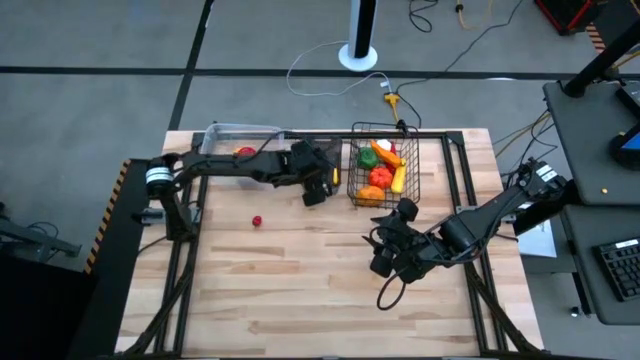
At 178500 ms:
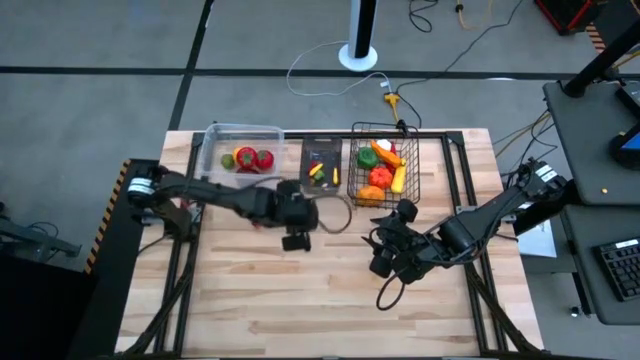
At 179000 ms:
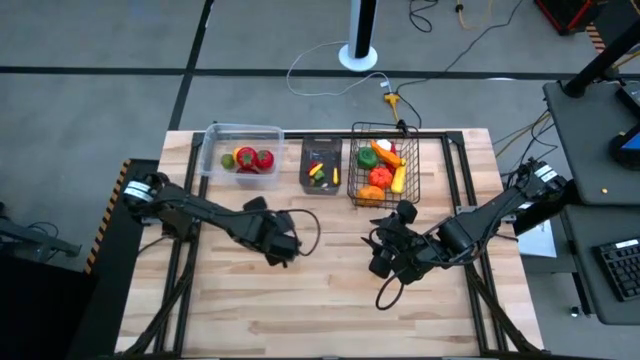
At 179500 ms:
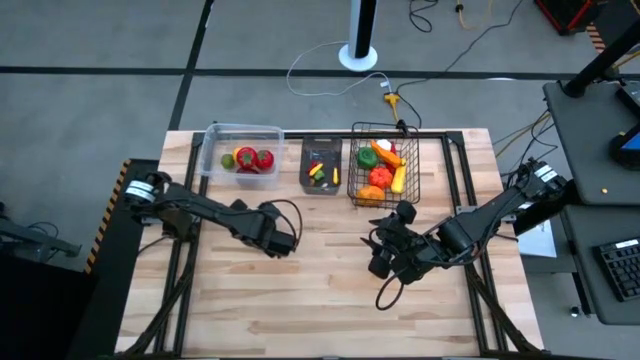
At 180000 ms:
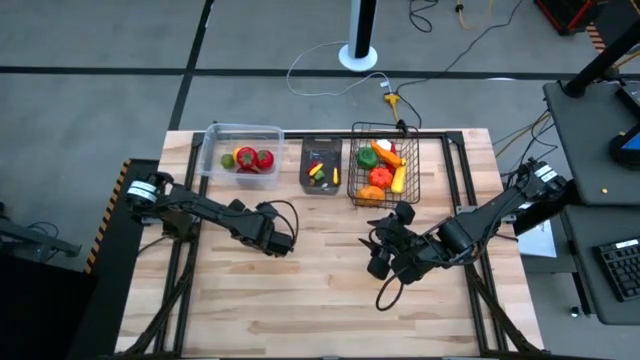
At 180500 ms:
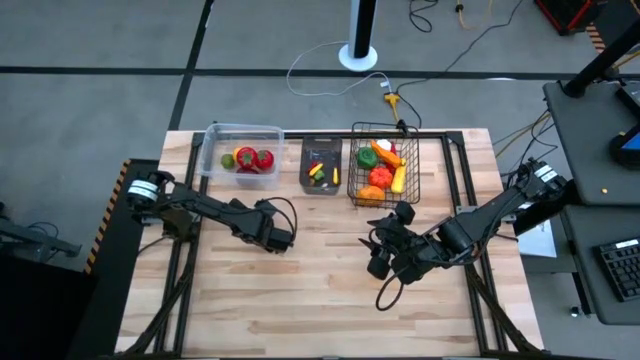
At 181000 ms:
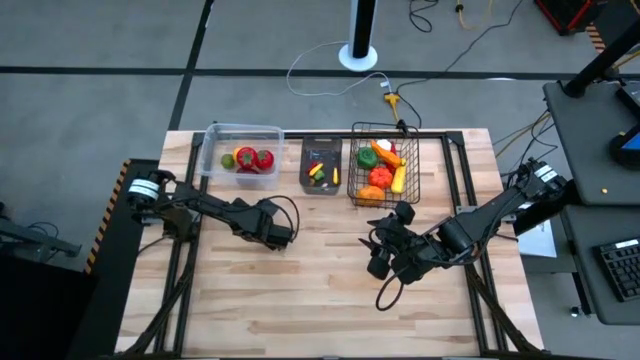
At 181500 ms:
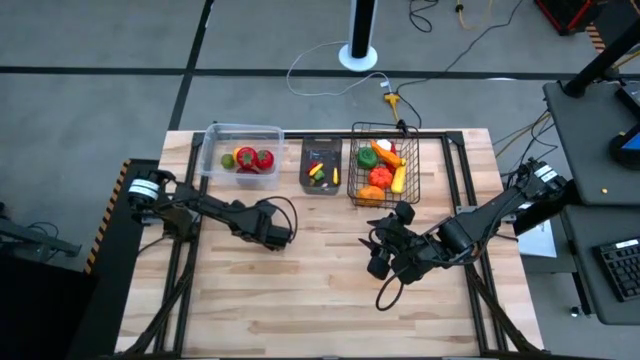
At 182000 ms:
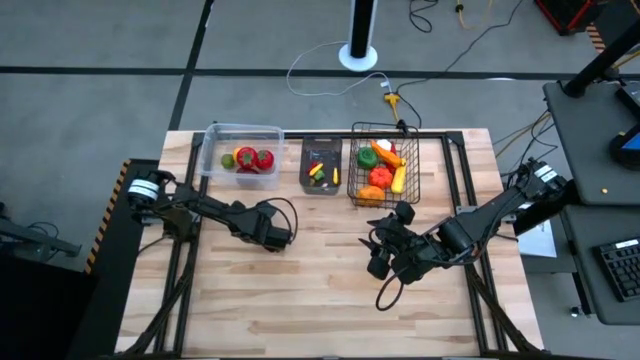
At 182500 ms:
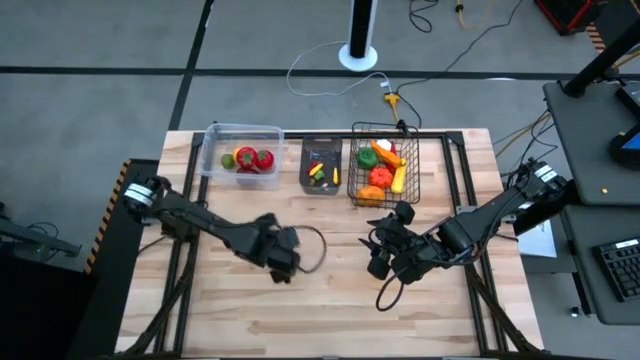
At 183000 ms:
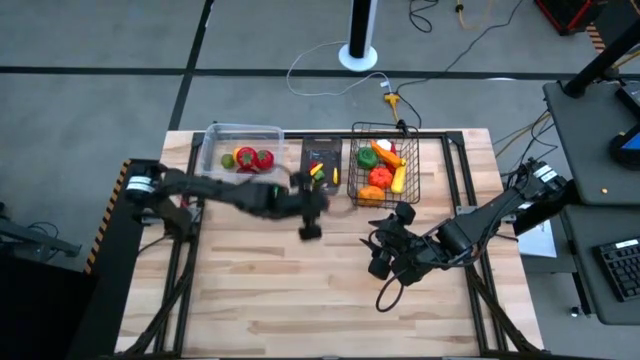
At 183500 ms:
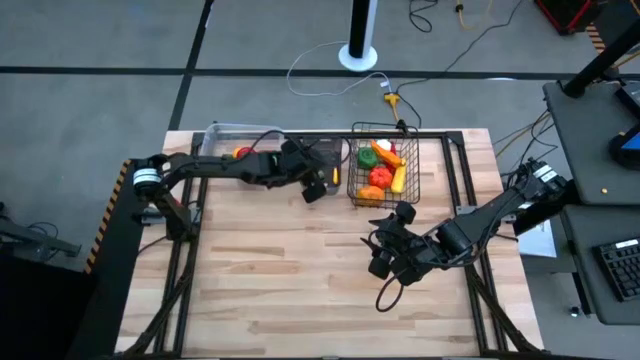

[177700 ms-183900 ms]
Task: Sort produce into baskets
Put the red chili pepper into the black bin

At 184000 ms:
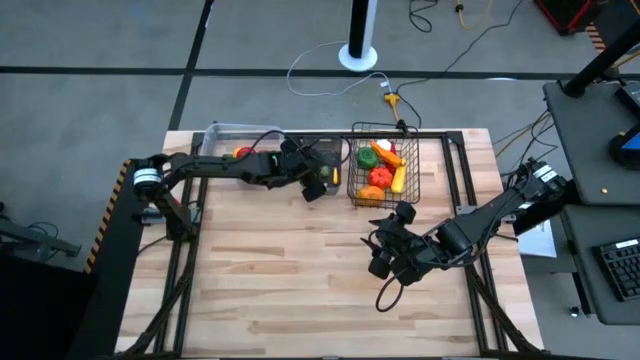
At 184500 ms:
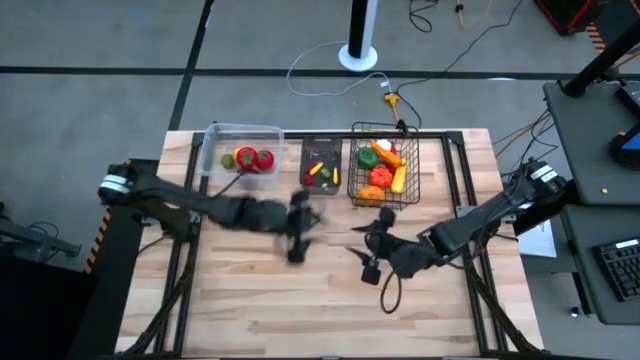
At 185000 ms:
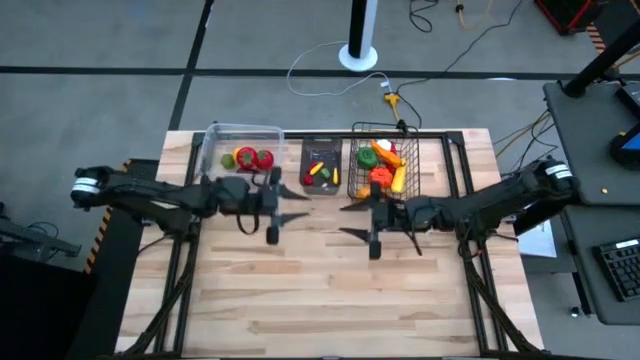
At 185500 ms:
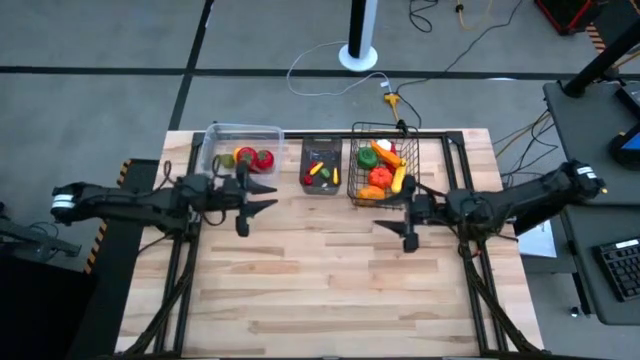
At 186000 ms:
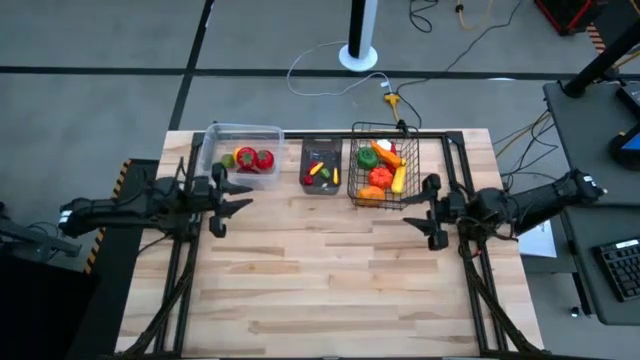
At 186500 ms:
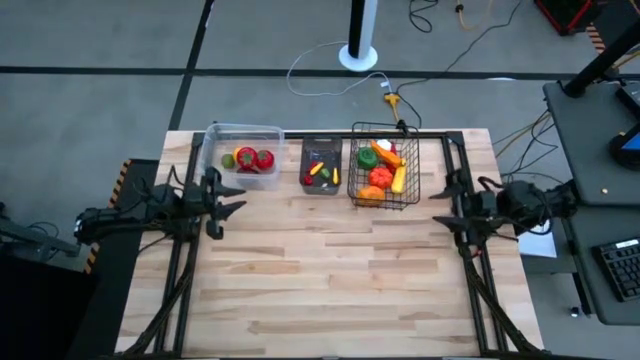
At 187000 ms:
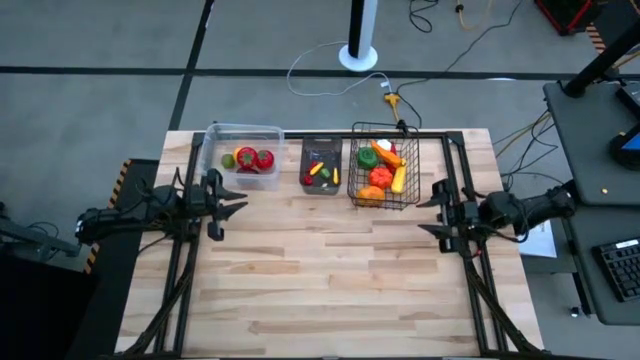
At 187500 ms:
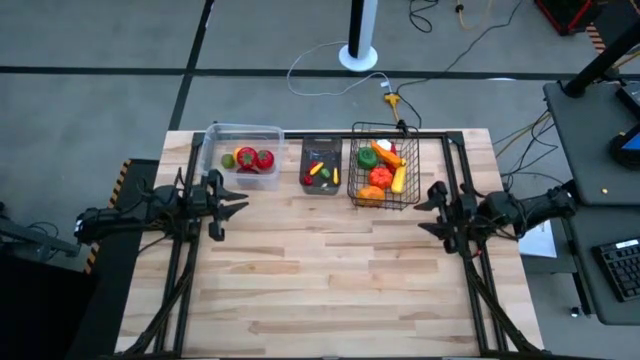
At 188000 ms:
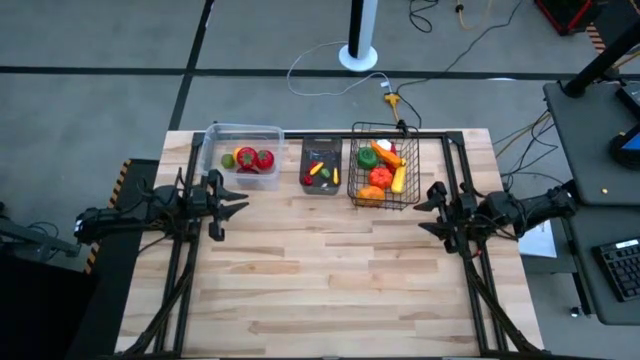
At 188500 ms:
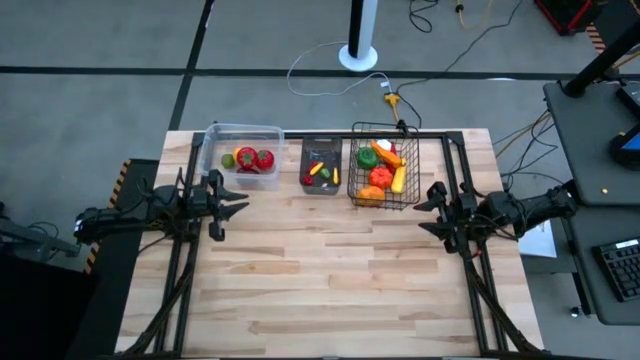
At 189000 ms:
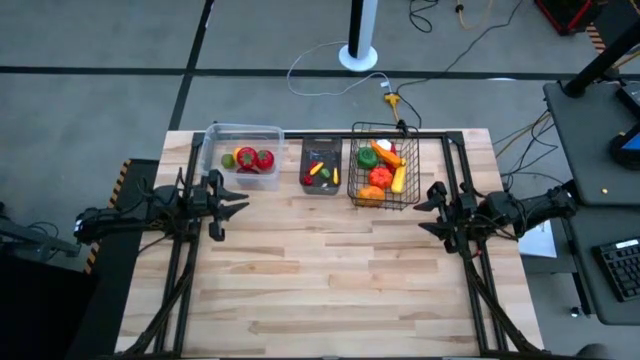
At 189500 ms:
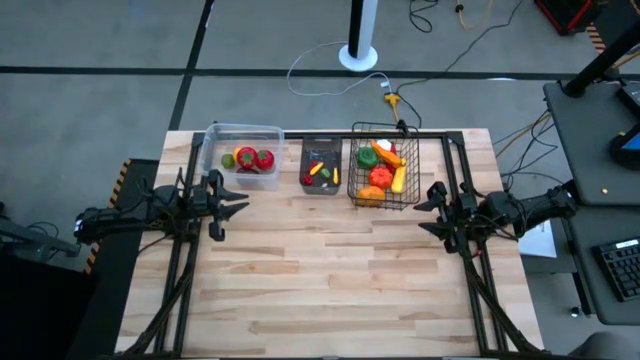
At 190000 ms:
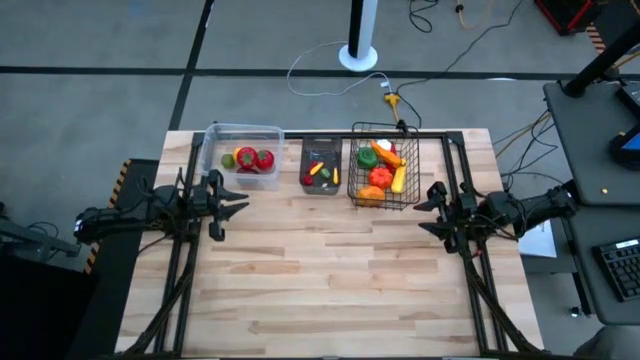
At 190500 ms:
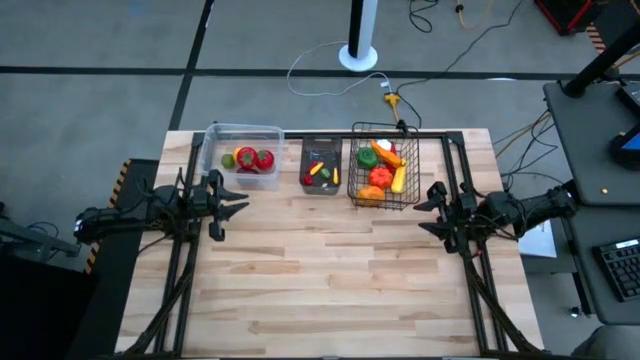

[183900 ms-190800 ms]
Return to Home Position

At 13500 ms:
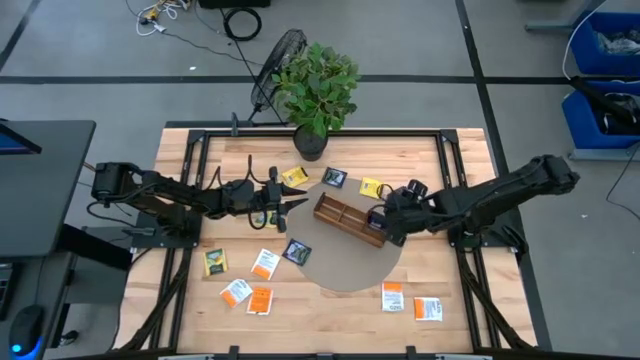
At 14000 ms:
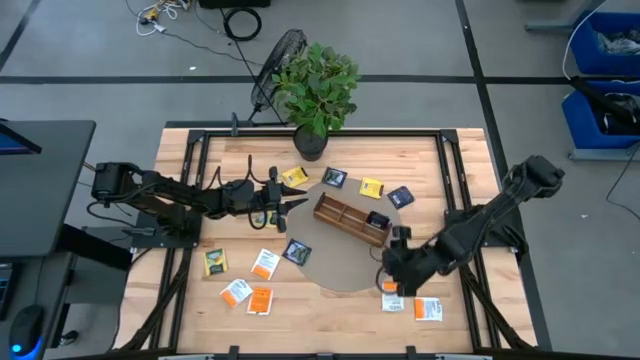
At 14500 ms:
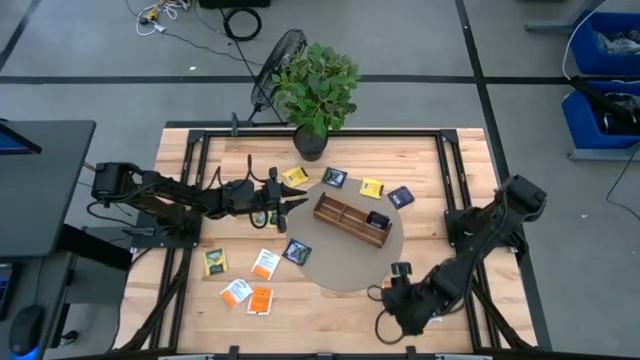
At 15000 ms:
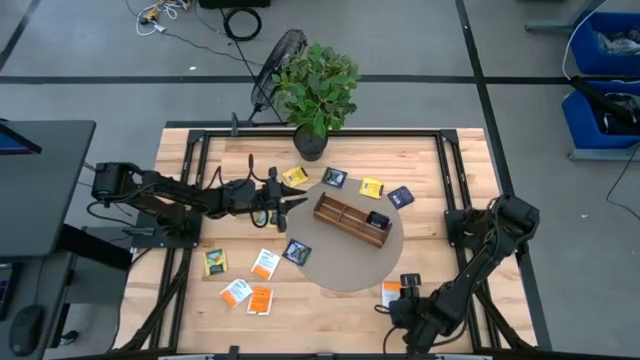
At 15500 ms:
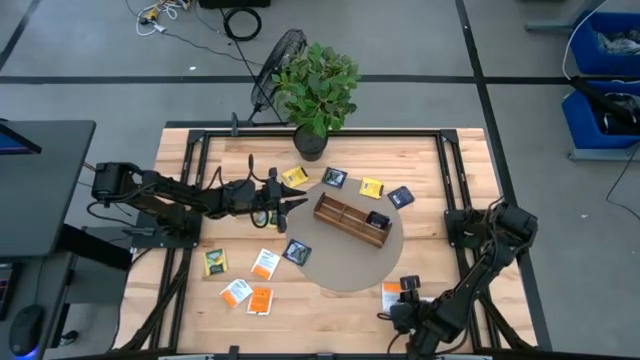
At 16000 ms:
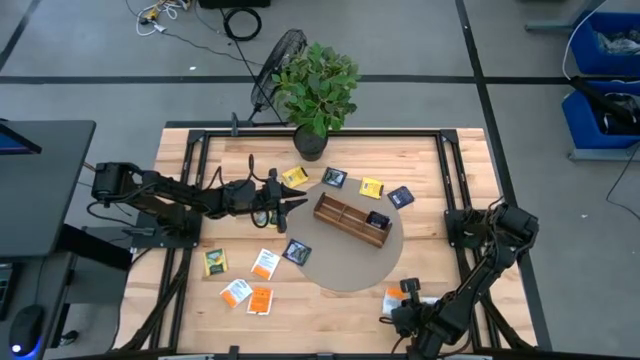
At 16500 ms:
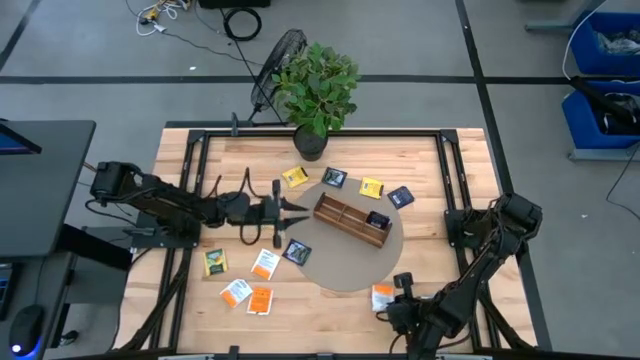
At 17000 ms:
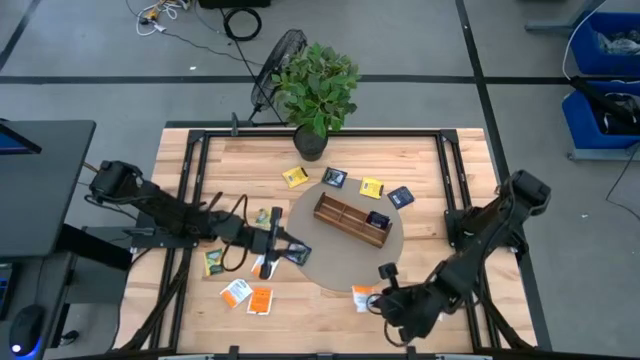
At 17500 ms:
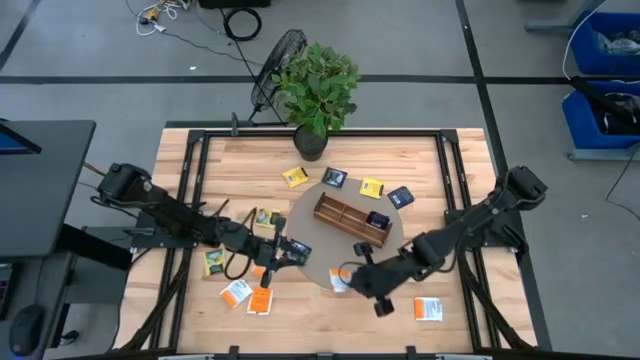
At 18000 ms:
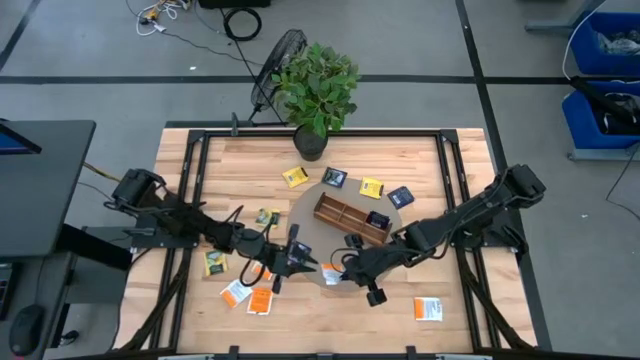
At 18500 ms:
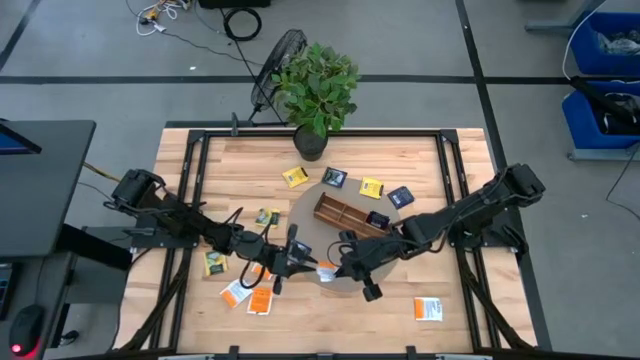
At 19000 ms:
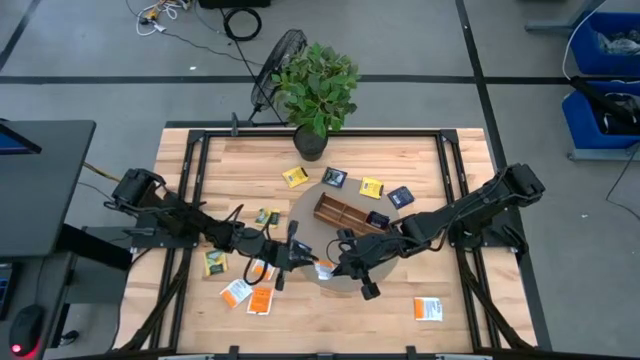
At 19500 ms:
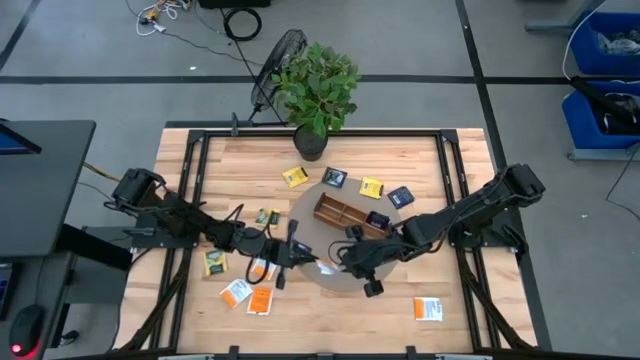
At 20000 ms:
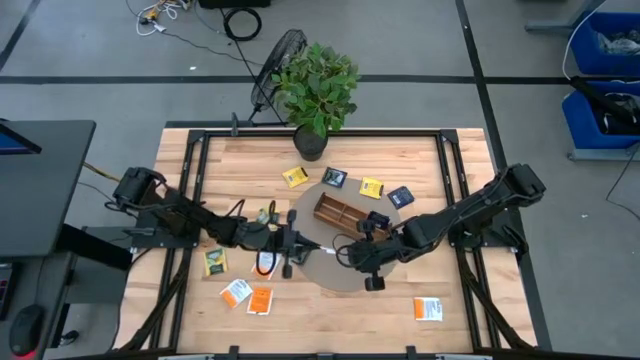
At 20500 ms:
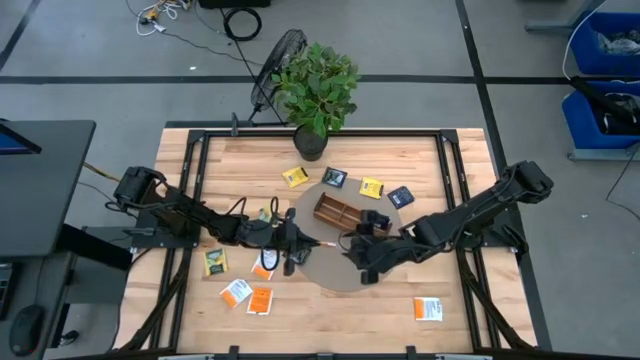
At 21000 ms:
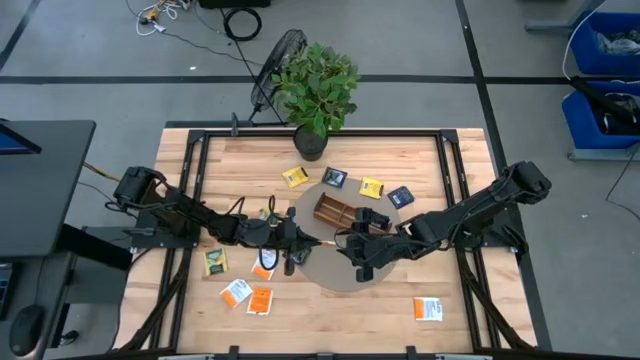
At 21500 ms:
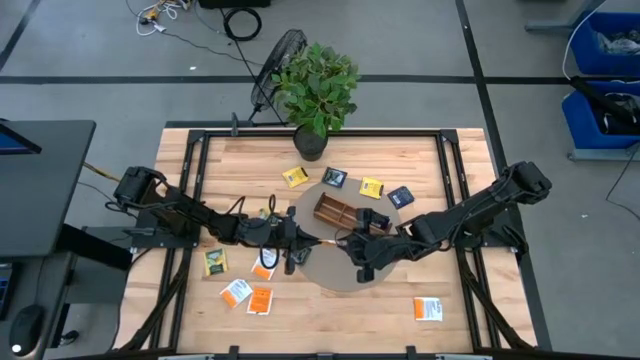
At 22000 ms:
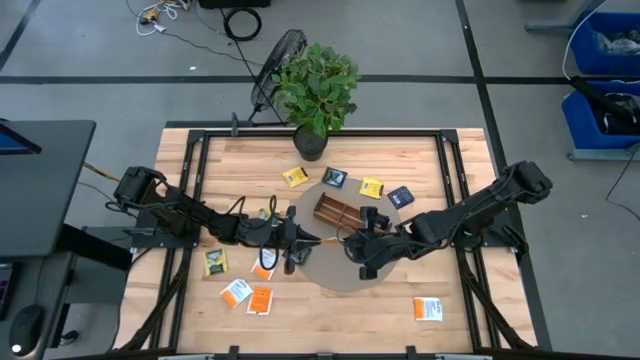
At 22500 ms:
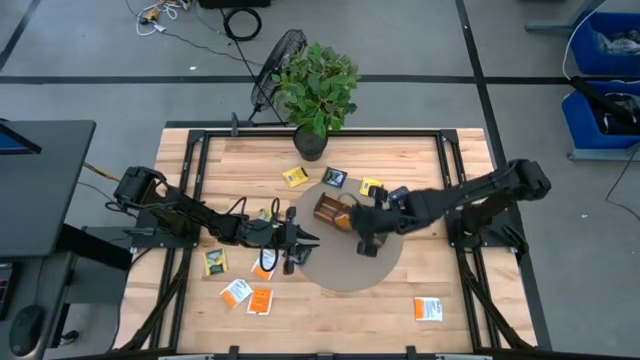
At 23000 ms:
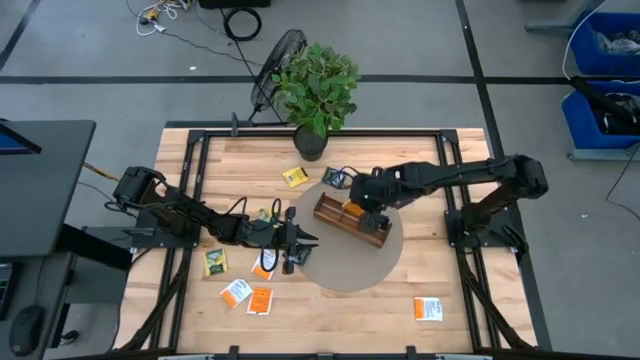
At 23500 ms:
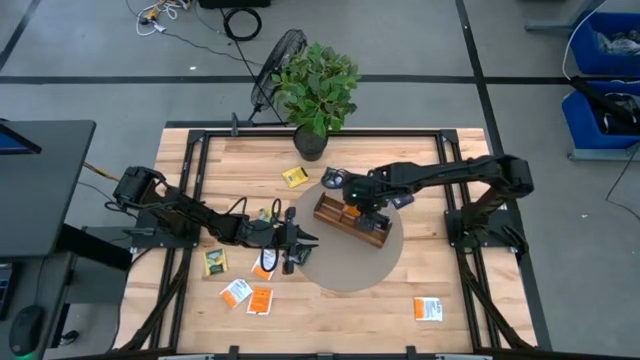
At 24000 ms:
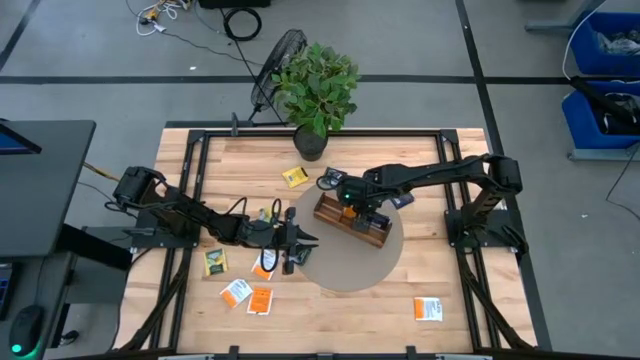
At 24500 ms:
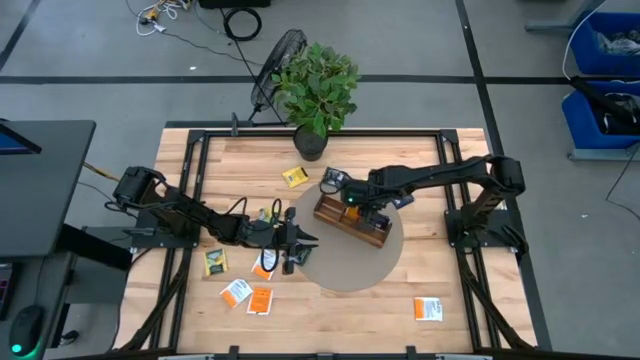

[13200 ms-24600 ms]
Task: Pick & Place Tea
Put the orange tea bag into the middle section of the wooden organizer
